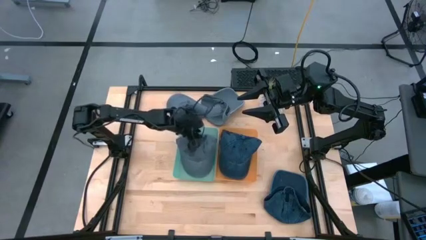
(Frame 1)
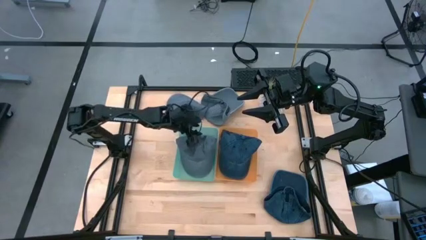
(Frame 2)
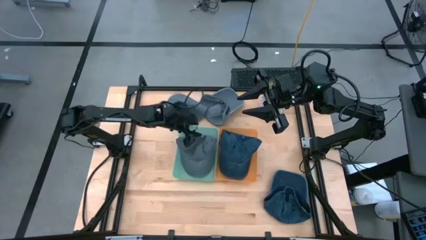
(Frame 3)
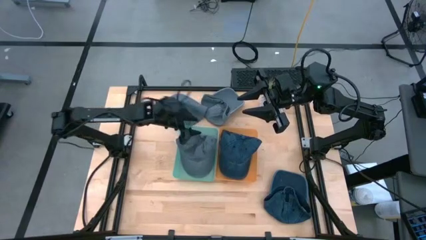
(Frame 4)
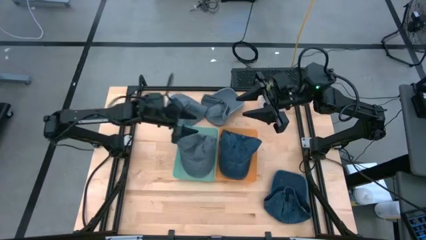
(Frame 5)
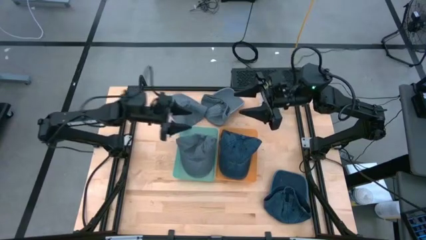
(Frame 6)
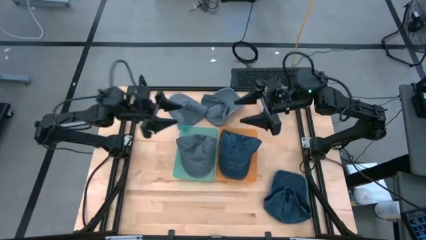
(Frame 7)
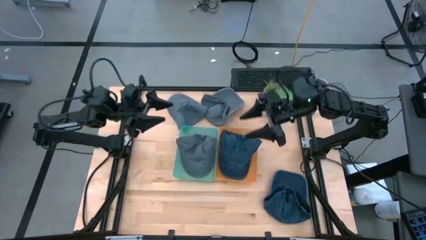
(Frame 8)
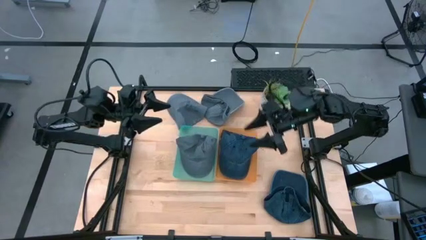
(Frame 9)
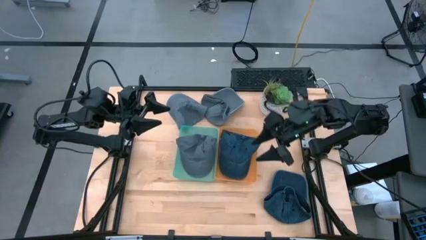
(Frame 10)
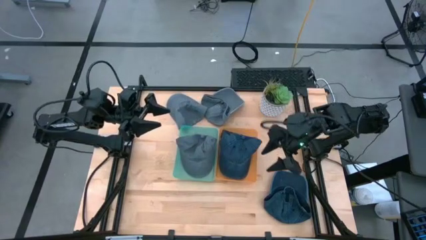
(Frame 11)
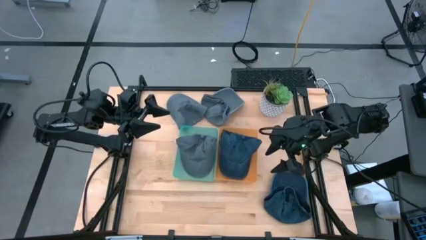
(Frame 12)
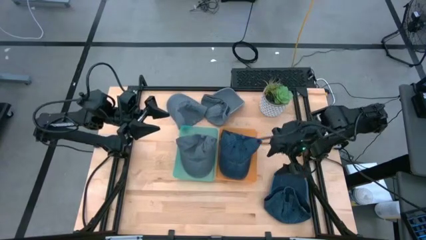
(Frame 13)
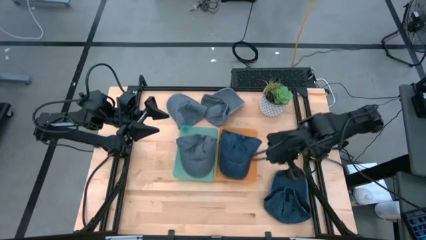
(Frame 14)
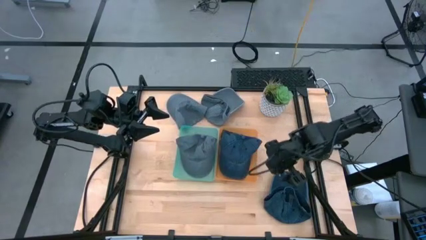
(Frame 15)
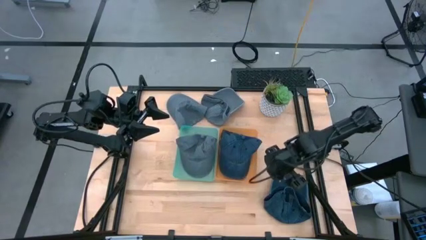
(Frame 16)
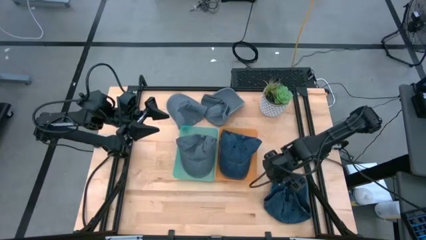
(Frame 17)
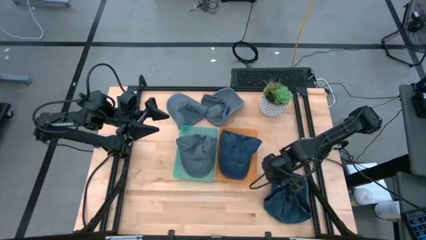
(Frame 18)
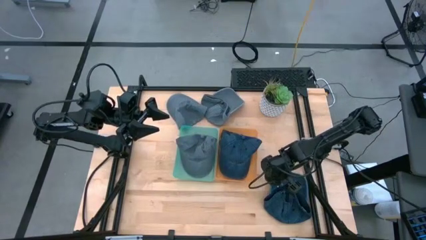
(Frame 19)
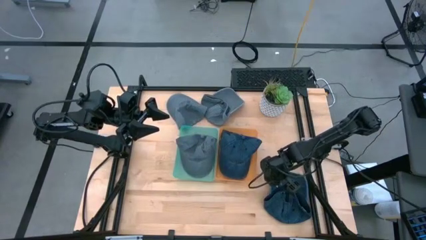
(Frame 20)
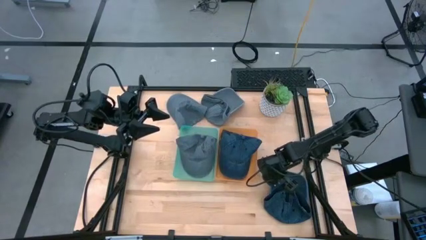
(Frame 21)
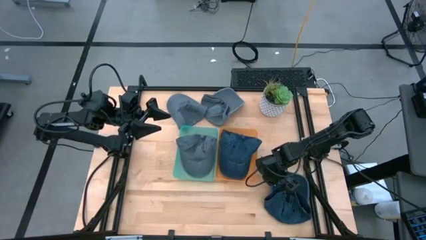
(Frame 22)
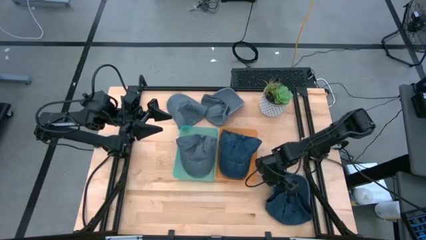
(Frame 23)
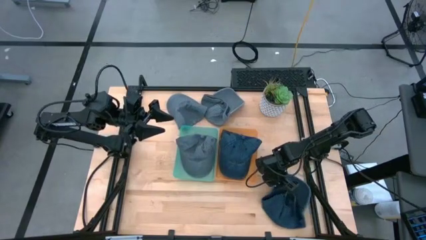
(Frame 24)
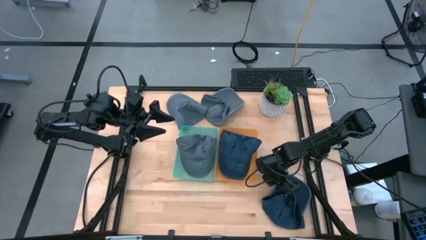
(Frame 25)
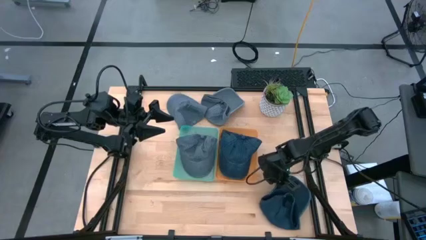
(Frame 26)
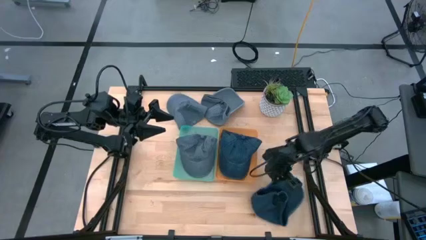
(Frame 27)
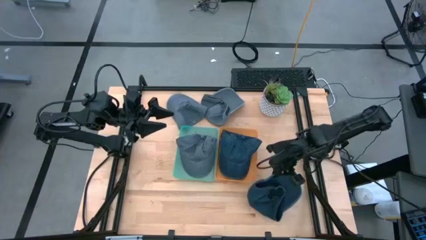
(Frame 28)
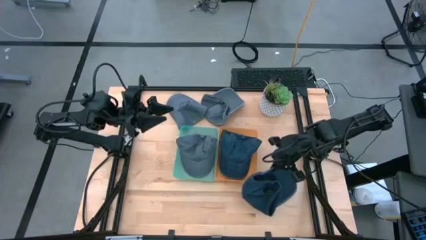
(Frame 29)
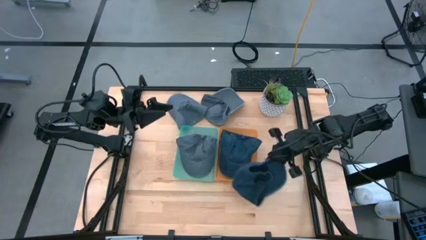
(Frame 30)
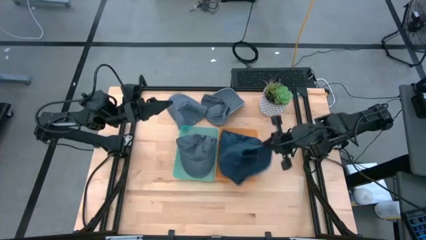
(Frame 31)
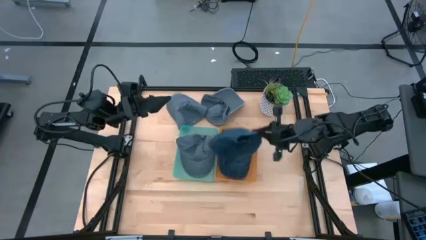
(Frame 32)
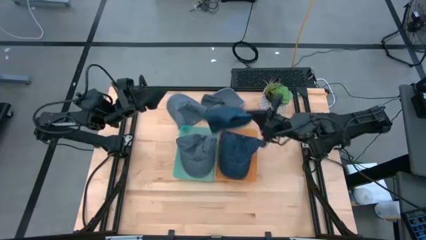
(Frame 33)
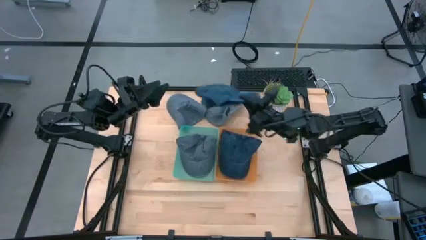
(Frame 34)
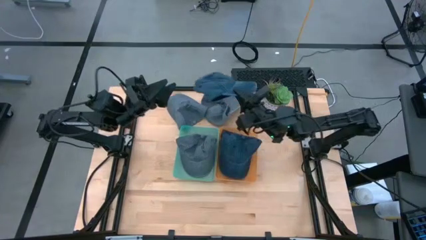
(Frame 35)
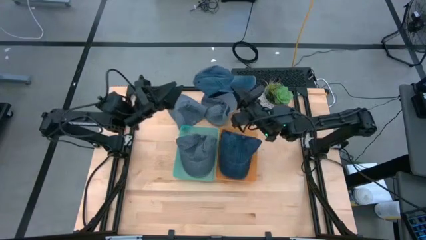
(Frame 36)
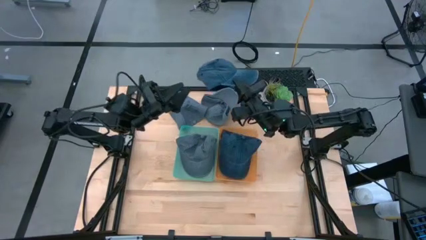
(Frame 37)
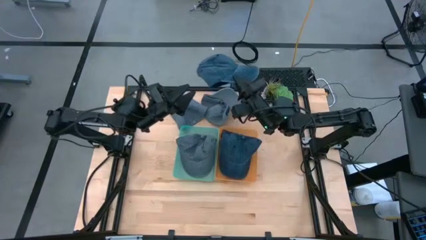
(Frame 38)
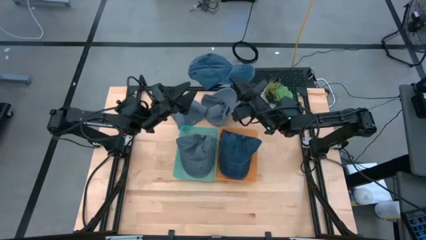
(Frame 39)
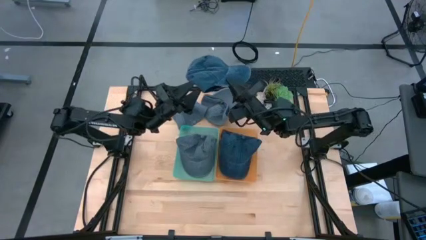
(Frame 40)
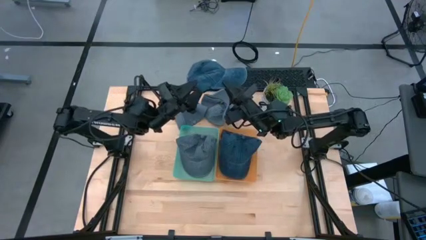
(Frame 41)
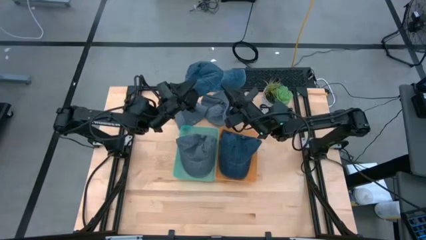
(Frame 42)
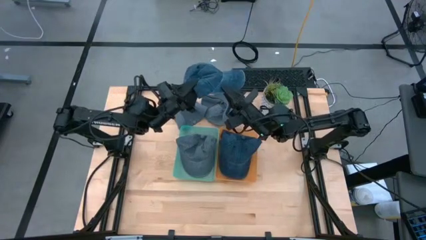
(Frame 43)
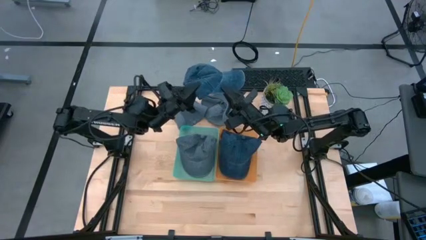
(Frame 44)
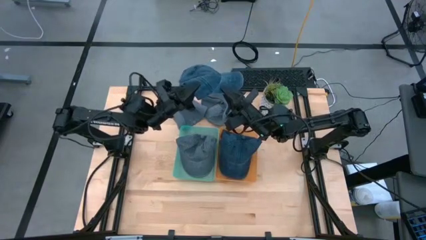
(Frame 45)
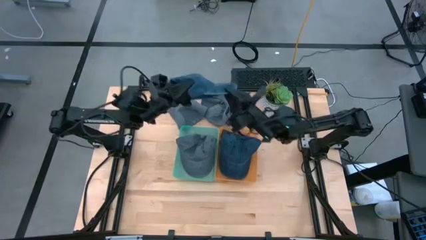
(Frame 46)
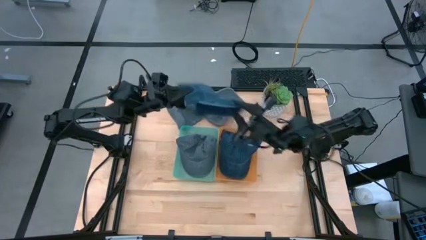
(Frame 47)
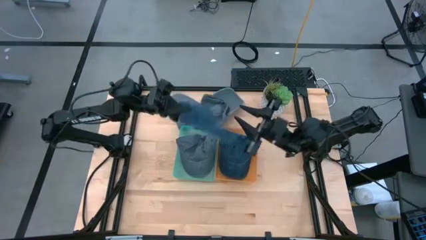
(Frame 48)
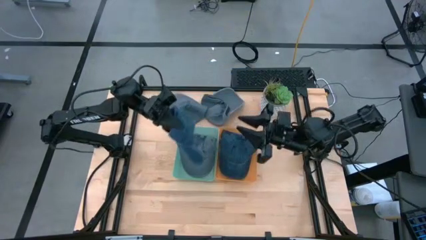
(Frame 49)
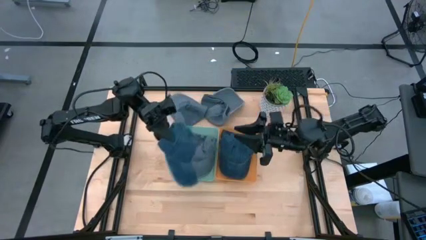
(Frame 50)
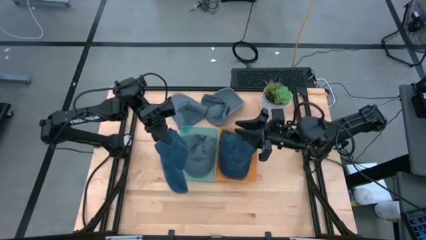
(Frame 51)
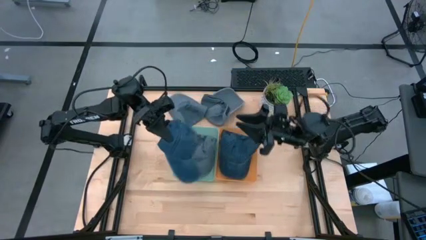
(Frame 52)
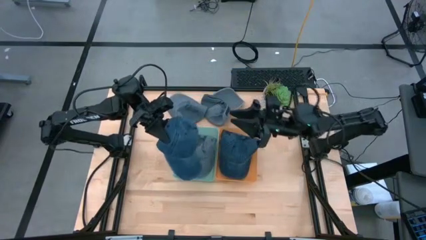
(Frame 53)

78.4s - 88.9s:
Task: Pick & Place hat
Put the blue cap into the orange bin

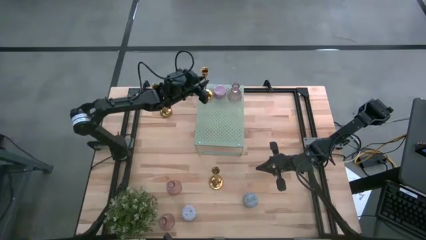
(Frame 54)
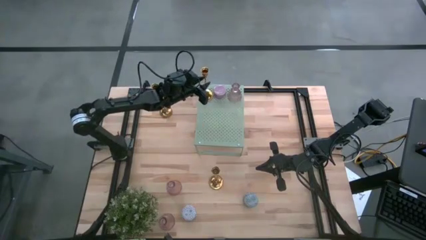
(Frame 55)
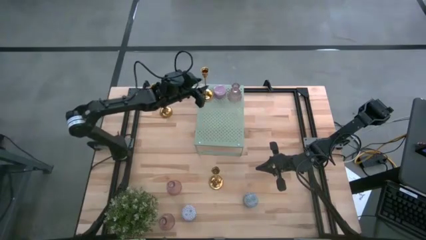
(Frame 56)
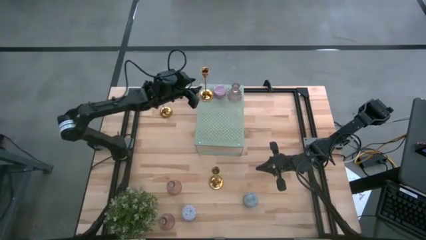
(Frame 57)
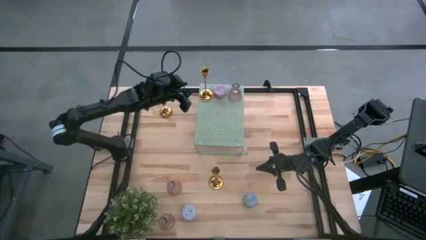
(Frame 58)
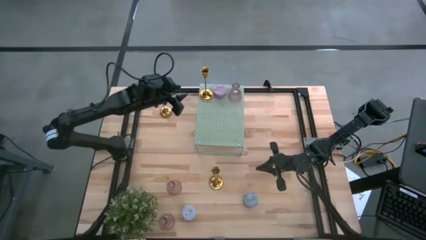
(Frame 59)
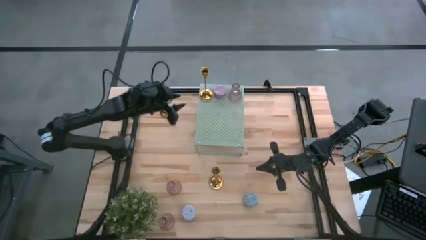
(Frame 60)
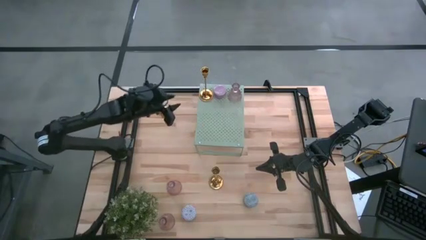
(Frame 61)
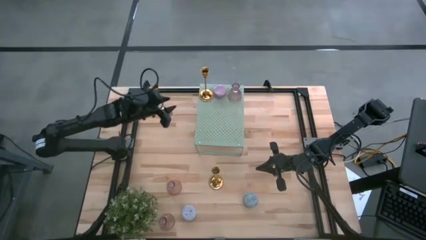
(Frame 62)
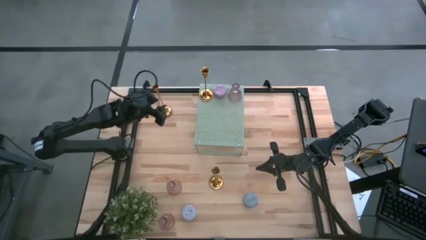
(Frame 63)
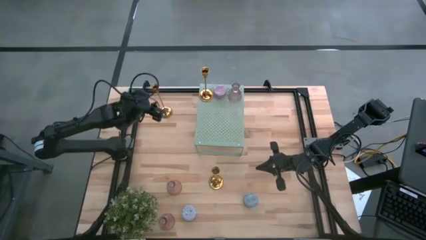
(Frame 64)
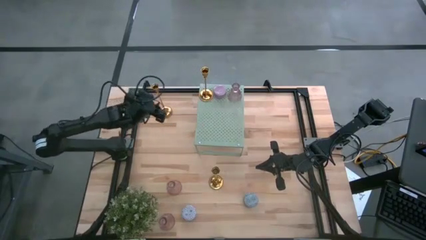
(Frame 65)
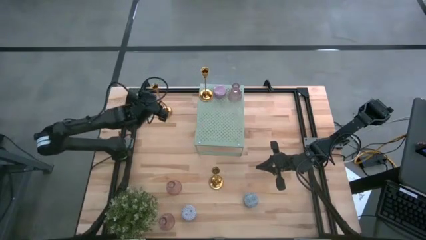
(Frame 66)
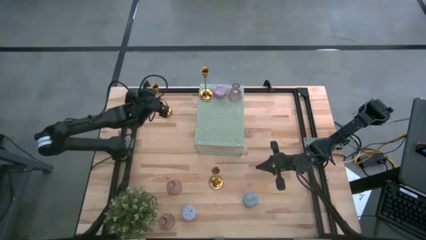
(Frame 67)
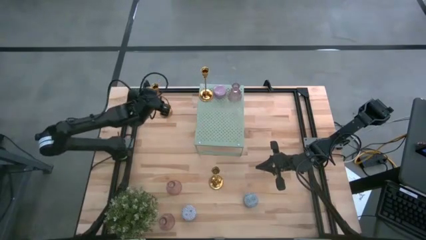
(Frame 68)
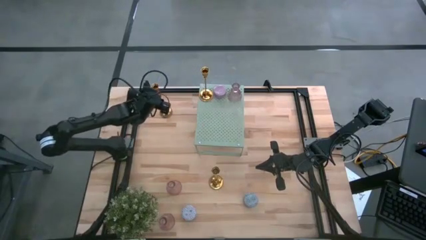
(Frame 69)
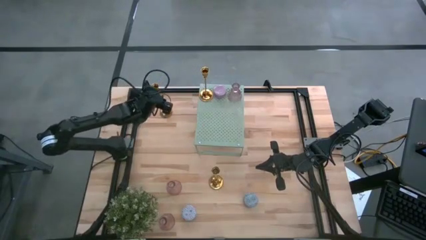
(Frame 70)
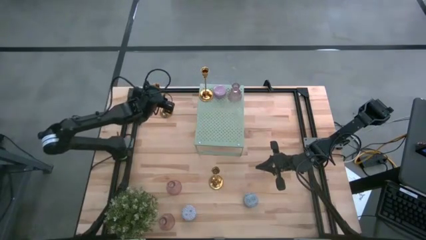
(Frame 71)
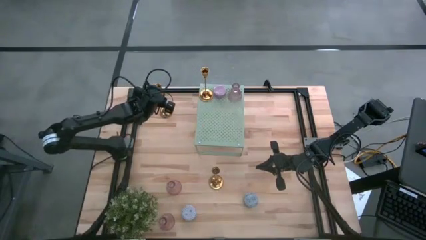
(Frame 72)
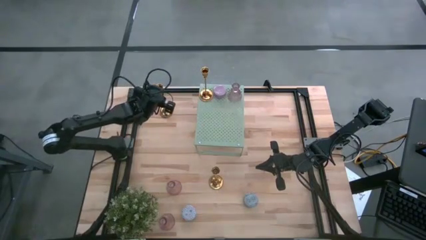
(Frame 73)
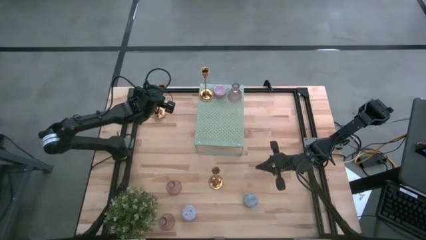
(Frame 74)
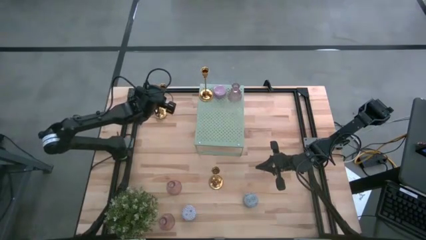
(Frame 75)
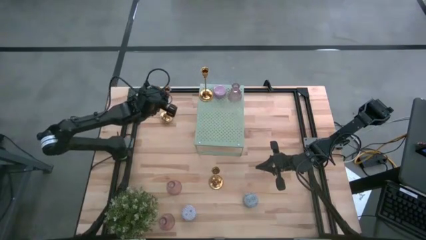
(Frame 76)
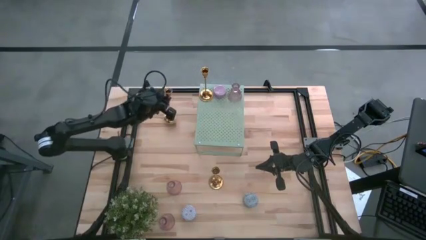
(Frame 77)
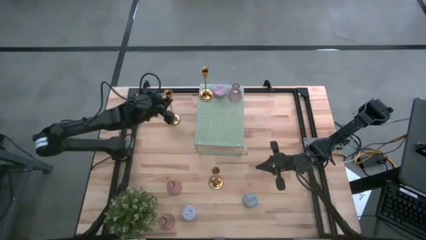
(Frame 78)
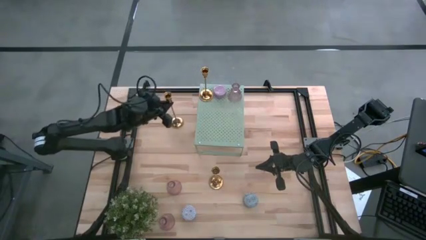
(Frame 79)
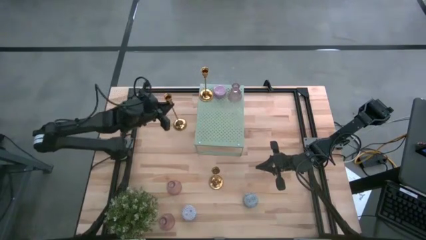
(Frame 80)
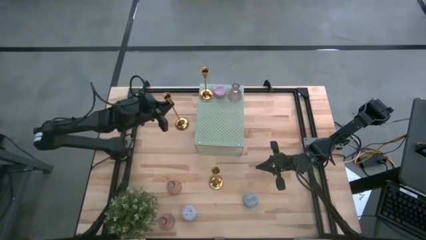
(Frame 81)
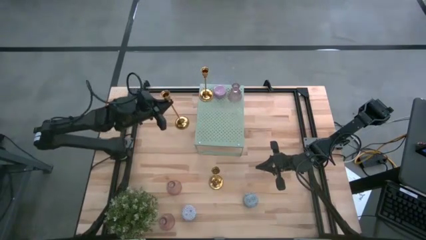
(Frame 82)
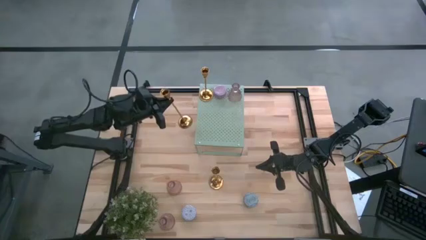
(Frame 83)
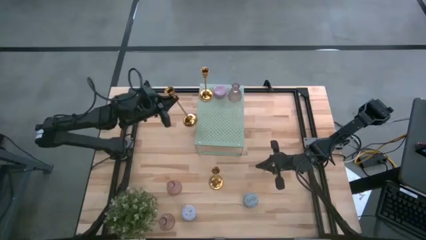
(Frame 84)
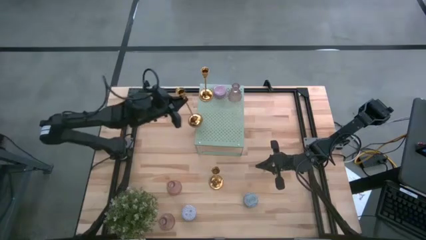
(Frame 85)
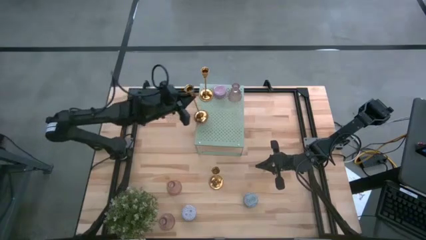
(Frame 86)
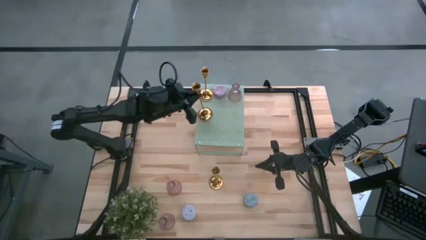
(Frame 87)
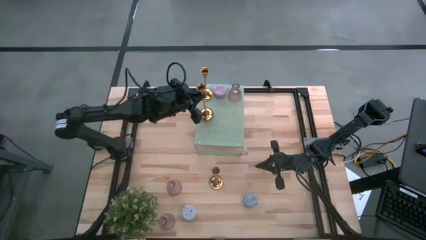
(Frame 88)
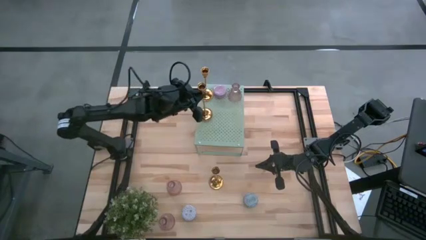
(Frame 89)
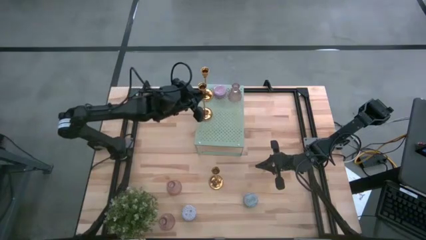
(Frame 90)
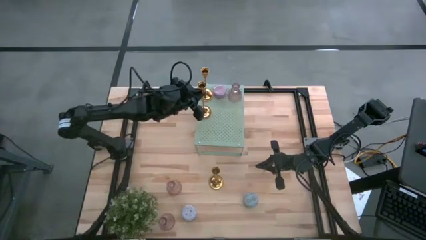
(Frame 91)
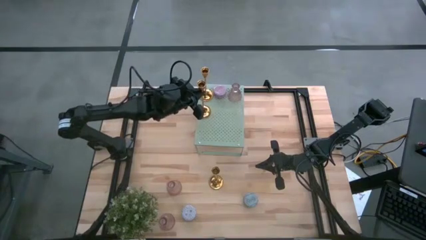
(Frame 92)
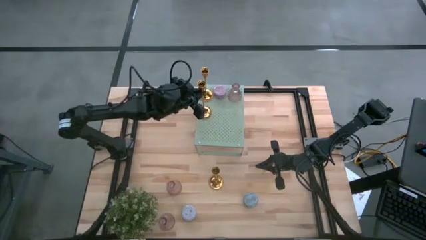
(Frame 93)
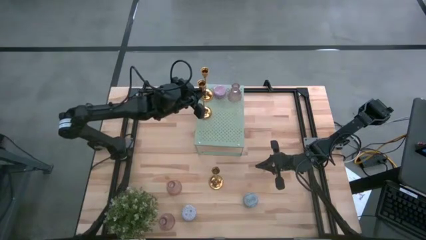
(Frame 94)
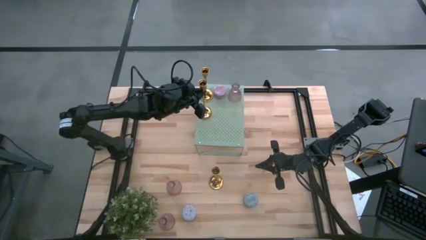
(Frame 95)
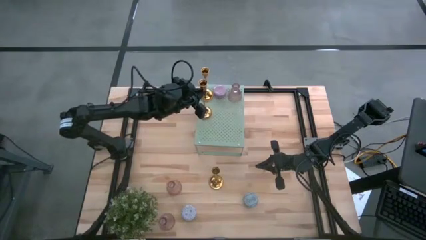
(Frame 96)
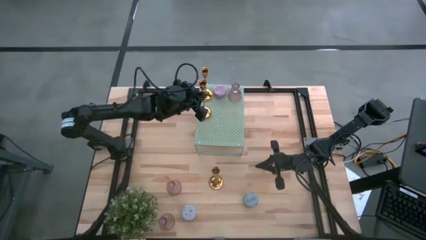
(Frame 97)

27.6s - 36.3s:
Task: Pick & Place candle stick holders
Put the top metal gold candle holder on the shelf
